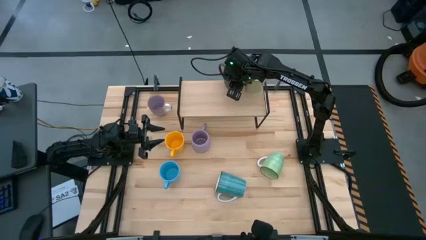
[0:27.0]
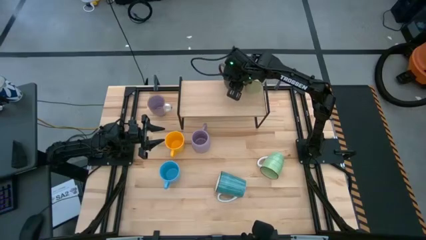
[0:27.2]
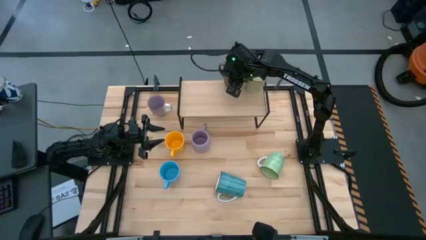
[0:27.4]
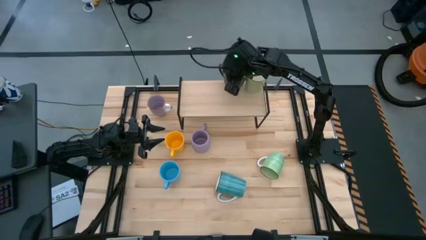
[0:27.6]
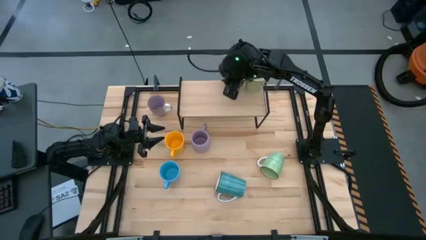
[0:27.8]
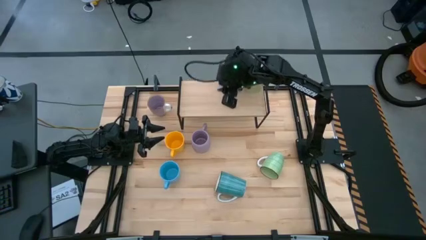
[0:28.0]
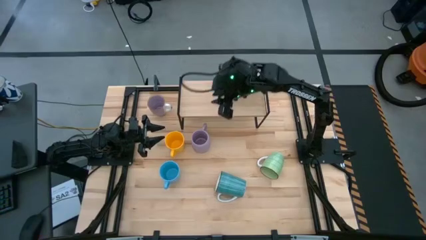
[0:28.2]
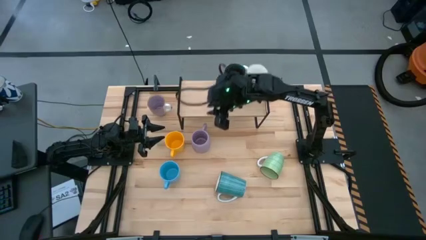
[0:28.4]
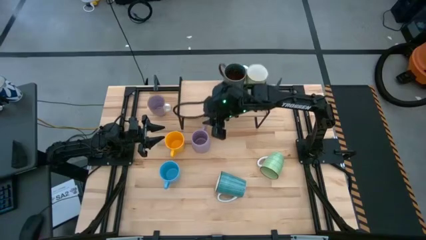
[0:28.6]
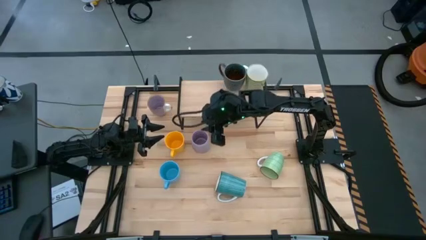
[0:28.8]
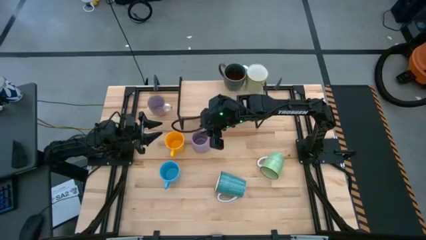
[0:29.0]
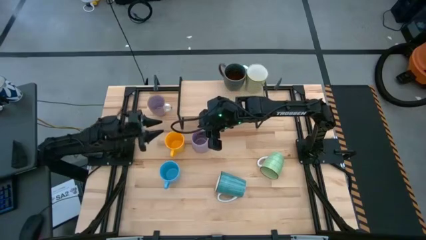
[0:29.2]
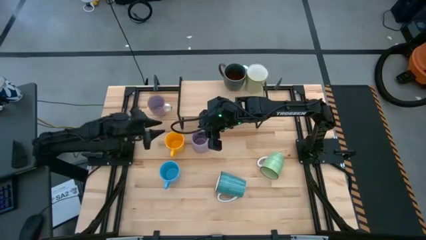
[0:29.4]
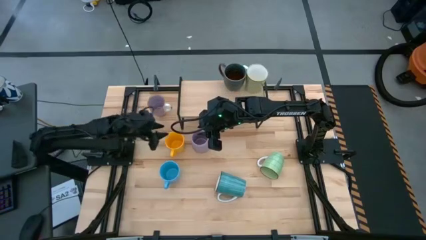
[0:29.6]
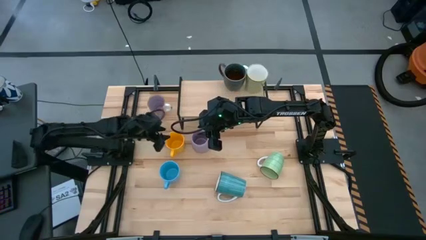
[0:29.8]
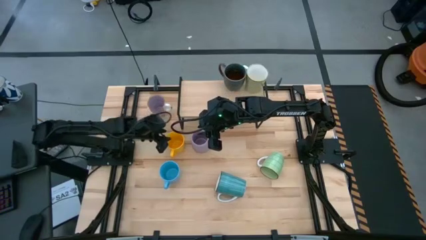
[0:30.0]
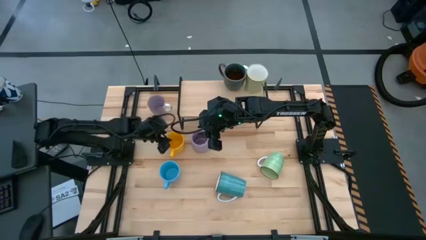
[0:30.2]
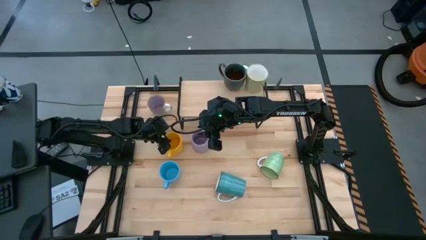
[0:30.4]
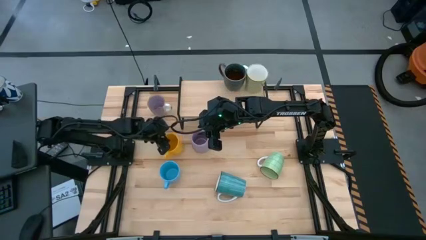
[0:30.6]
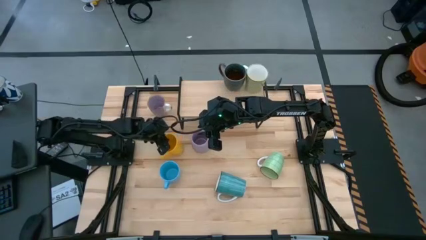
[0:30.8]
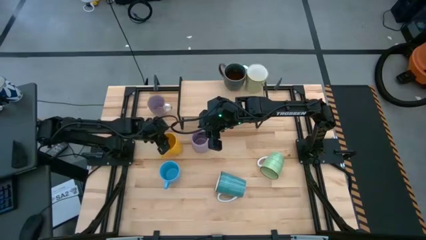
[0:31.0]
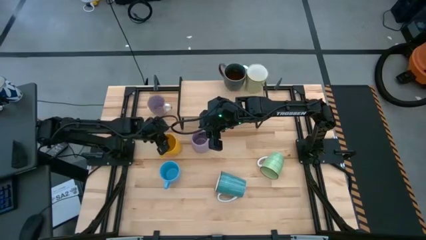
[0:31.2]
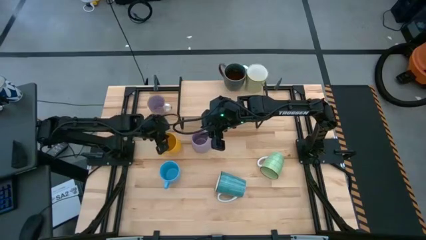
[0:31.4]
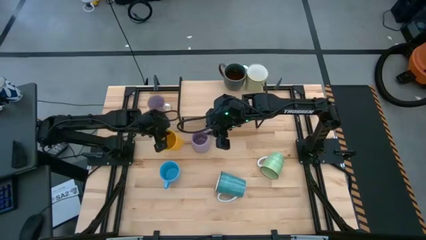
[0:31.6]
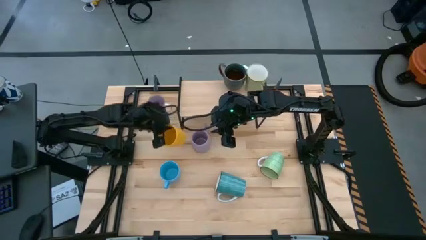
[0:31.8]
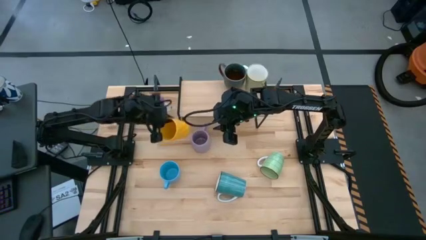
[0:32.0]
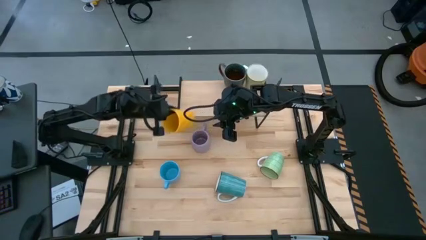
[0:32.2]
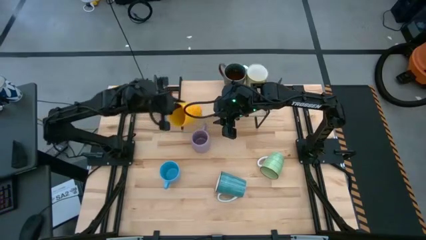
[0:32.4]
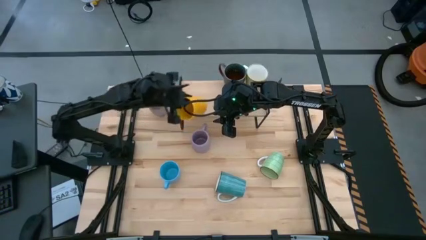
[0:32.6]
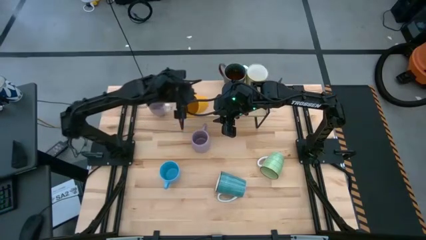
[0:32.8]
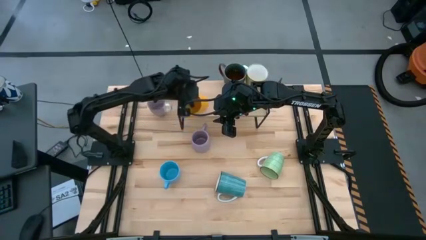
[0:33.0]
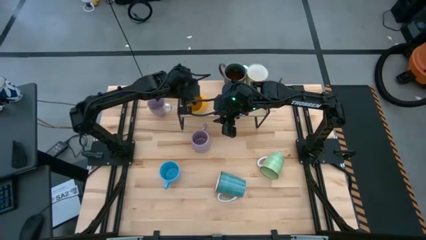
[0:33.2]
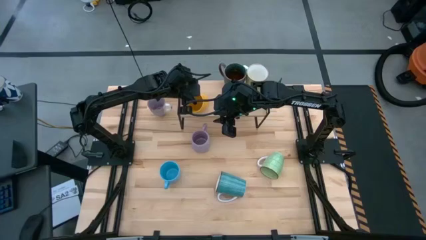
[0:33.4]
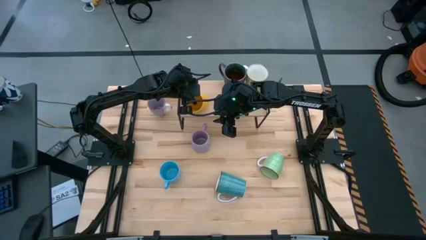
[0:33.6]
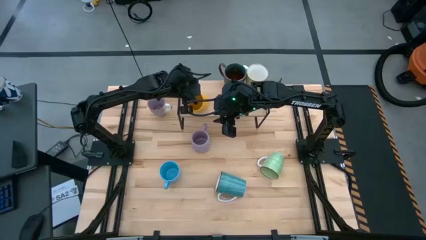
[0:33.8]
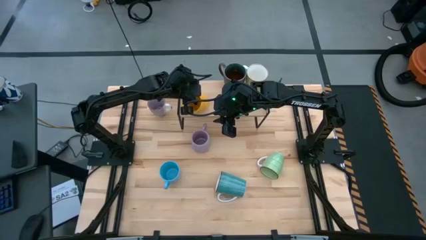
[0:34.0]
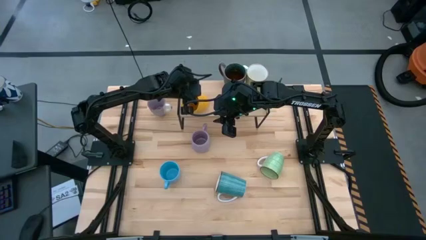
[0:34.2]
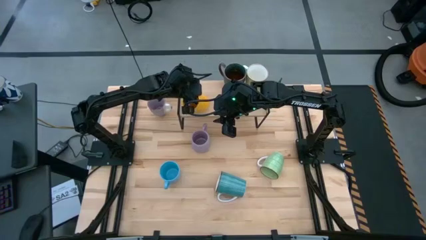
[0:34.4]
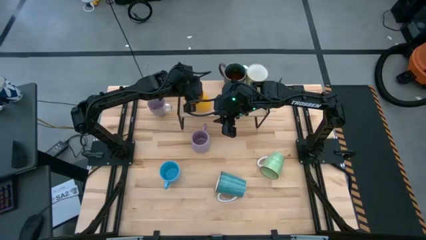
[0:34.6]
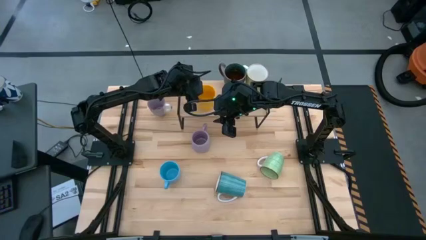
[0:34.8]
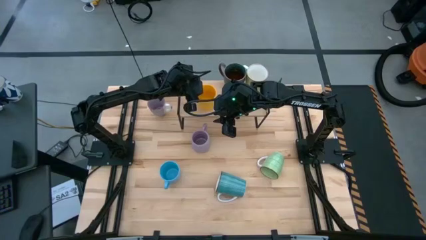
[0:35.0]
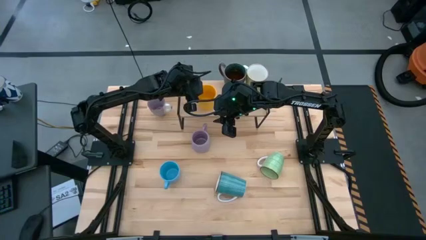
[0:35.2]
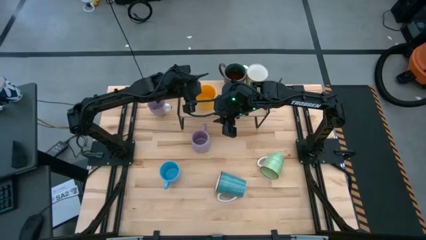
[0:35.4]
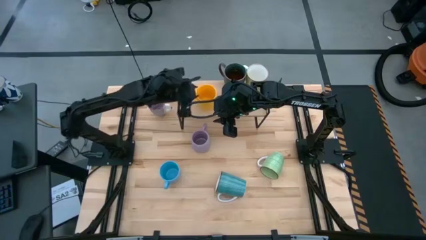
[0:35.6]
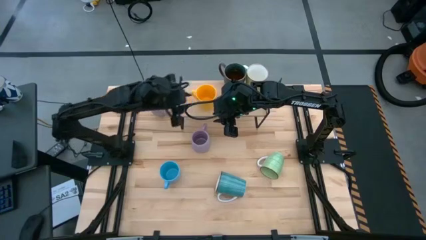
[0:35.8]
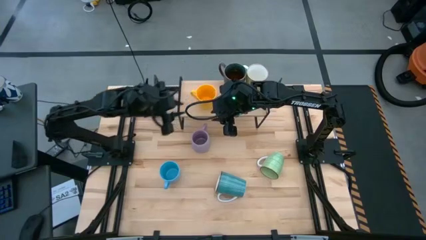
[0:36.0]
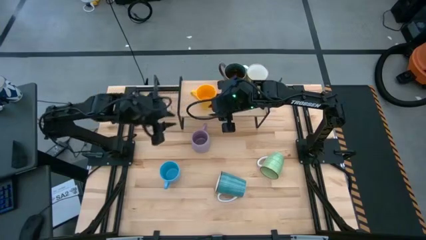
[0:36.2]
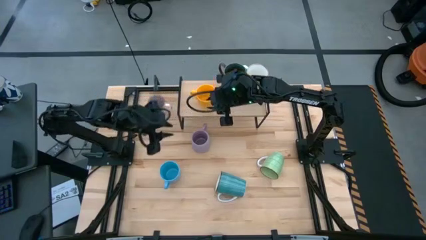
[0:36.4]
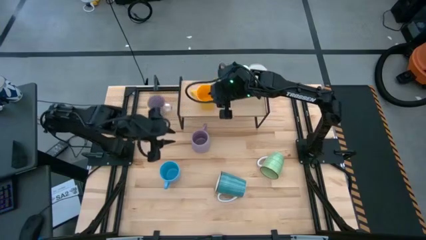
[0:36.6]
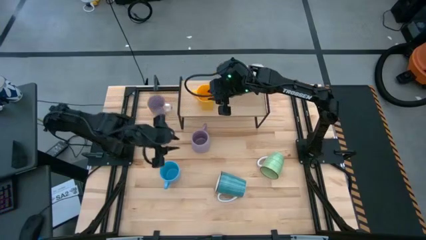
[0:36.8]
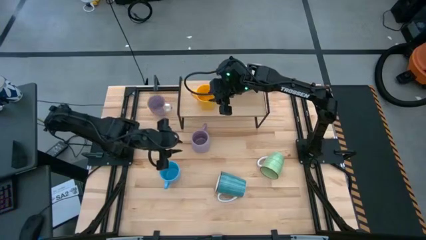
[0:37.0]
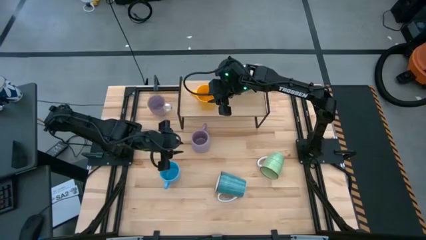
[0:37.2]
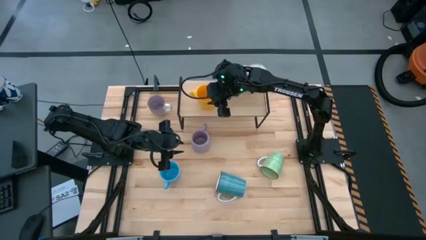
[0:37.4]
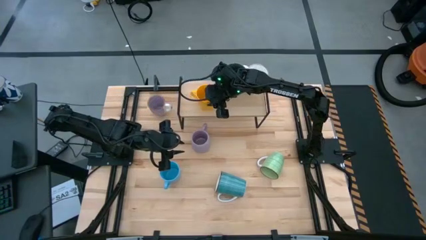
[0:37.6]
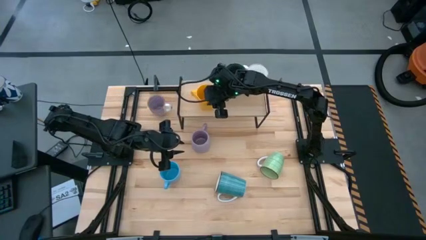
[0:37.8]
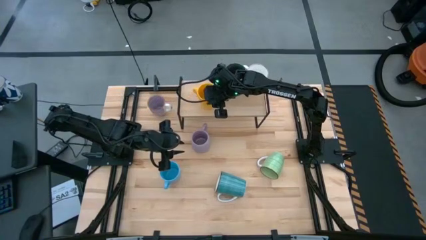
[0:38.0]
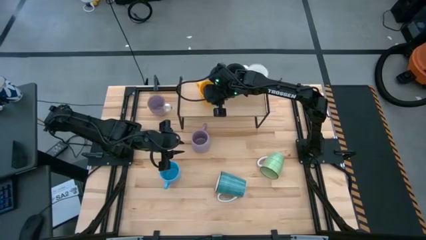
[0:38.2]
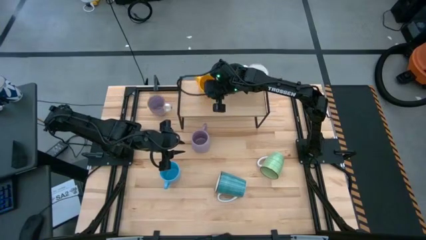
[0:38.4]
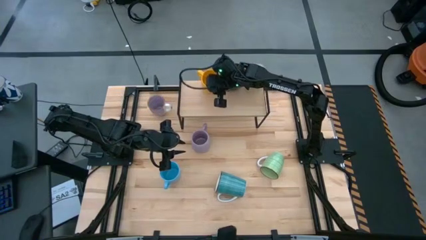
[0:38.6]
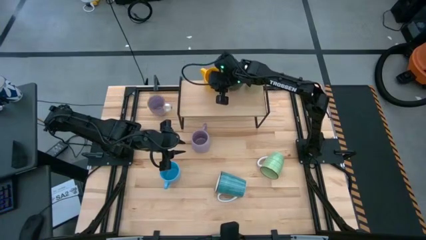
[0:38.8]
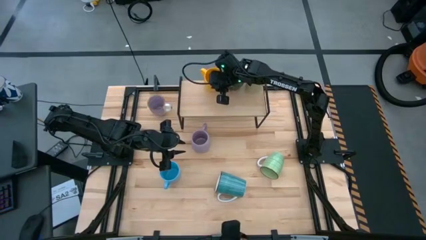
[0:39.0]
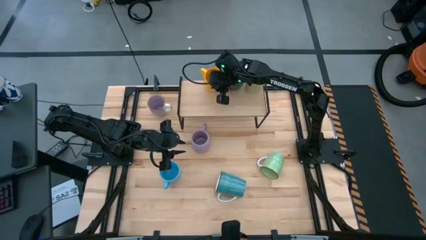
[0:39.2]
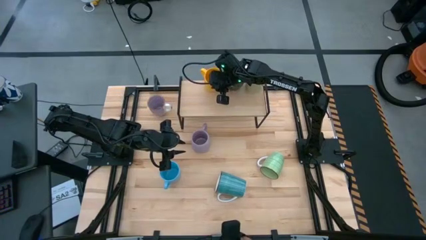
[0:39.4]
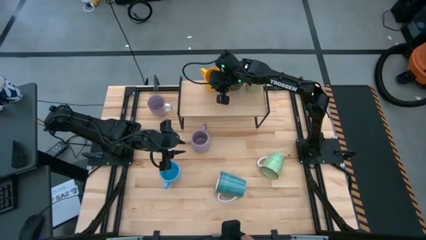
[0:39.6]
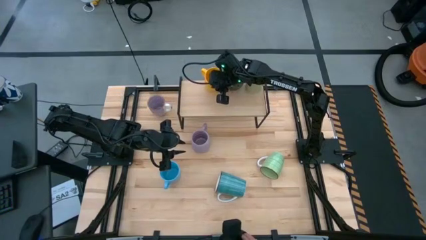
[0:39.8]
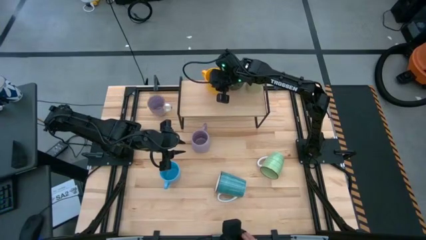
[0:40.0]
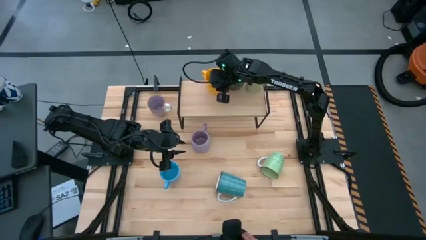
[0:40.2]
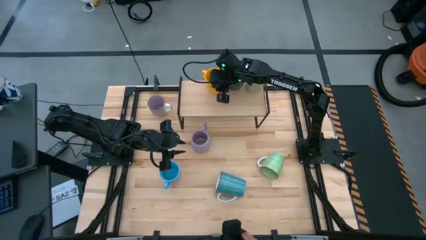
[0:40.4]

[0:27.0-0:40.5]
Task: Place coffee mugs
Put the yellow mug on the shelf
